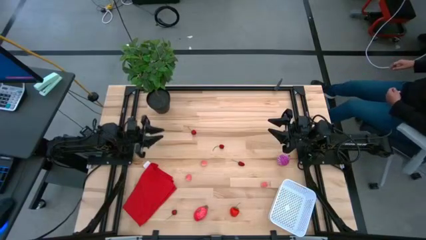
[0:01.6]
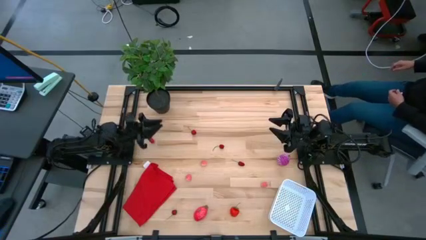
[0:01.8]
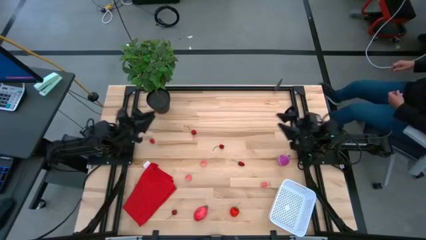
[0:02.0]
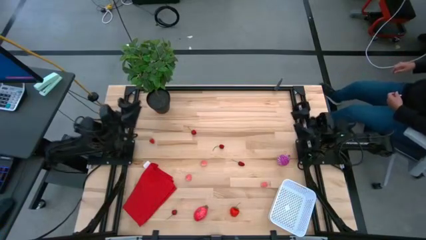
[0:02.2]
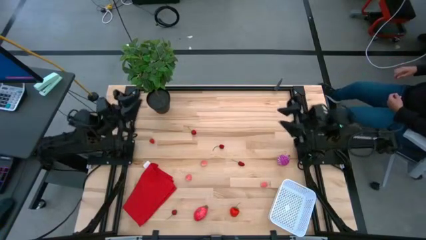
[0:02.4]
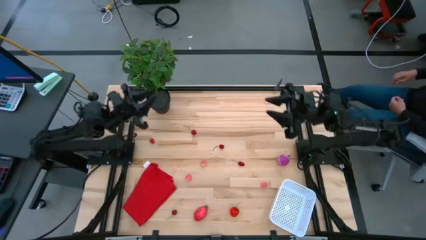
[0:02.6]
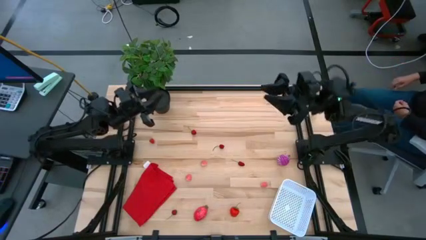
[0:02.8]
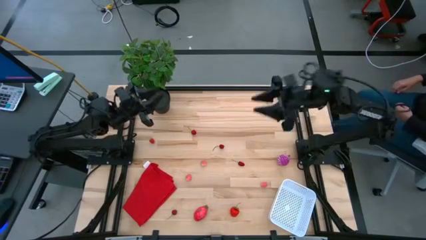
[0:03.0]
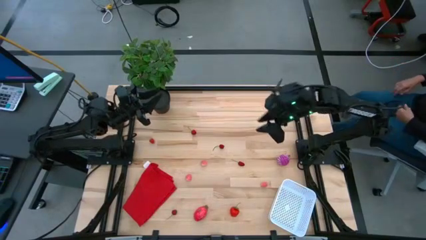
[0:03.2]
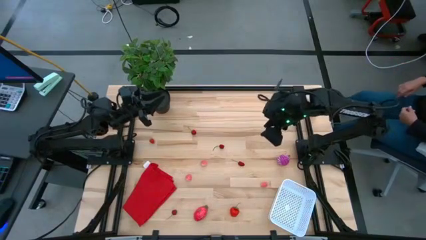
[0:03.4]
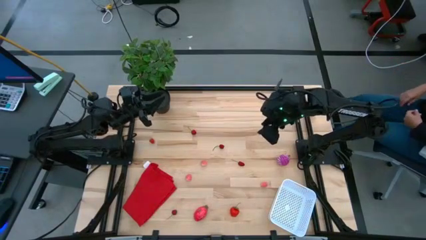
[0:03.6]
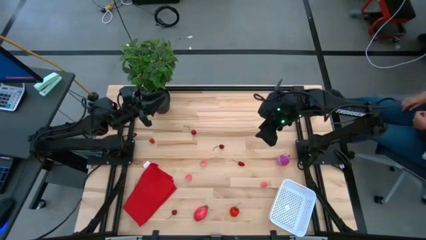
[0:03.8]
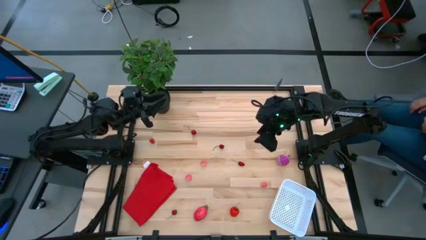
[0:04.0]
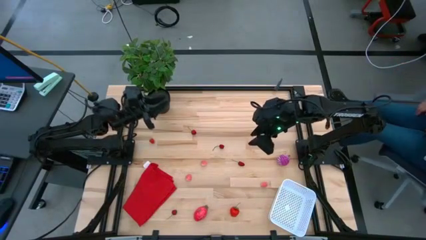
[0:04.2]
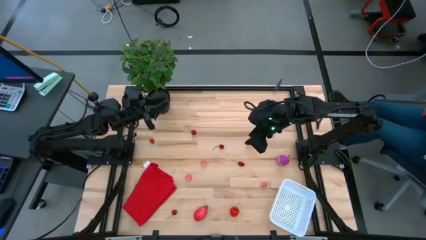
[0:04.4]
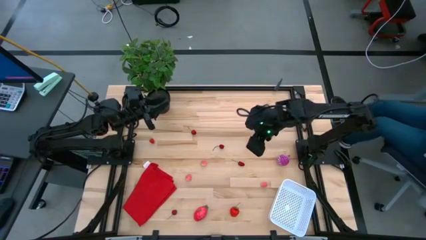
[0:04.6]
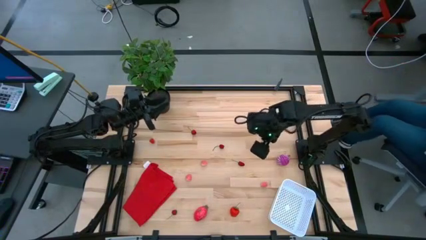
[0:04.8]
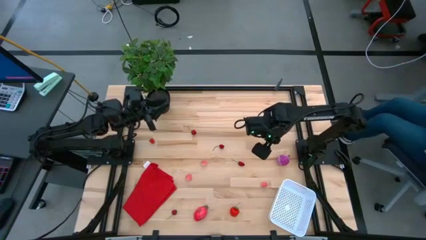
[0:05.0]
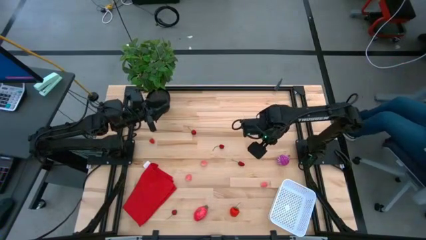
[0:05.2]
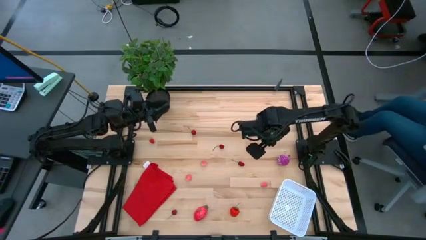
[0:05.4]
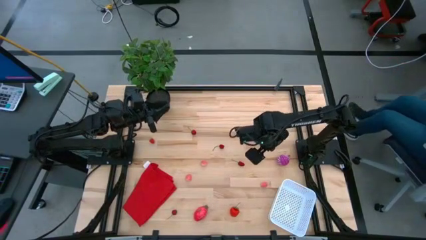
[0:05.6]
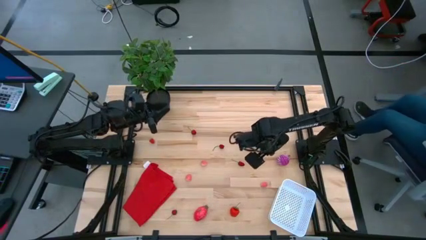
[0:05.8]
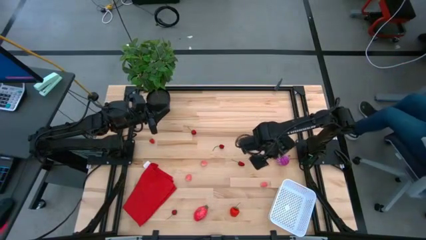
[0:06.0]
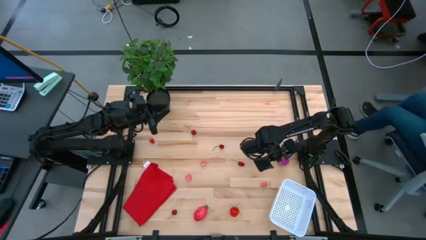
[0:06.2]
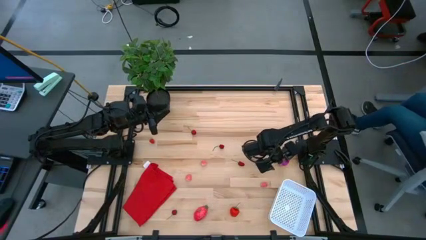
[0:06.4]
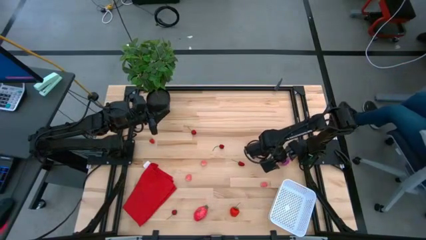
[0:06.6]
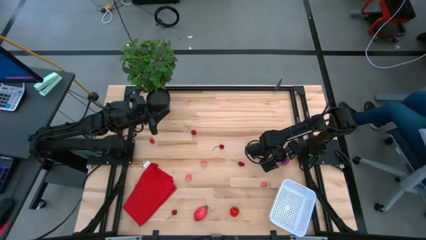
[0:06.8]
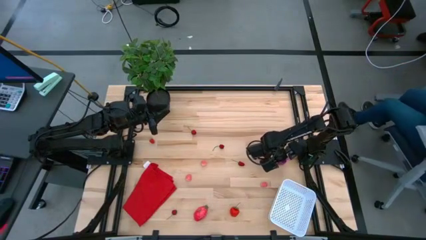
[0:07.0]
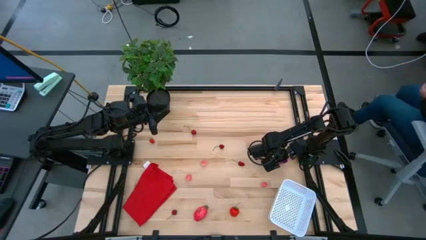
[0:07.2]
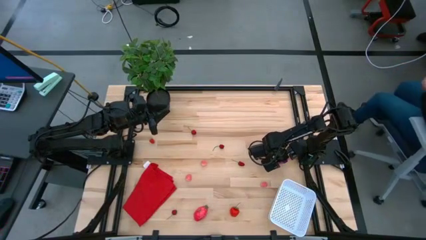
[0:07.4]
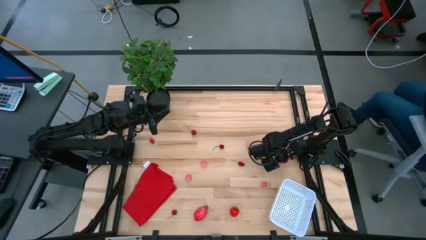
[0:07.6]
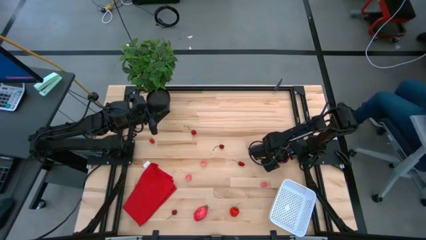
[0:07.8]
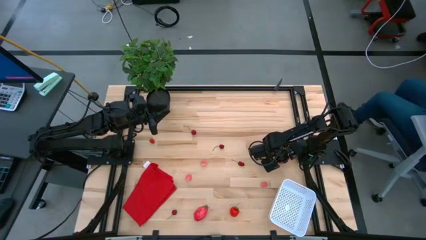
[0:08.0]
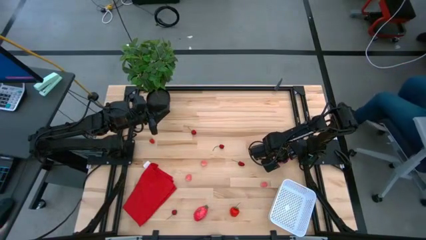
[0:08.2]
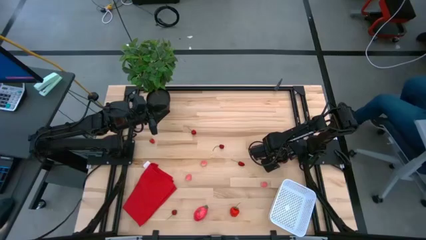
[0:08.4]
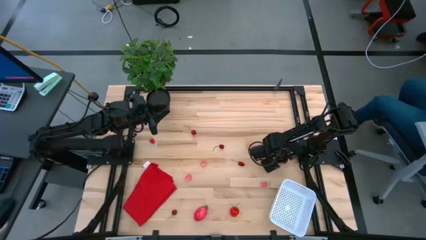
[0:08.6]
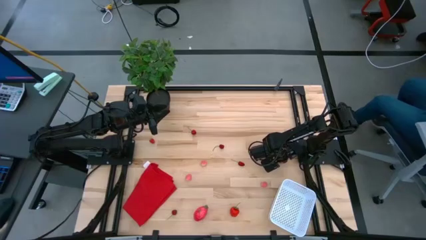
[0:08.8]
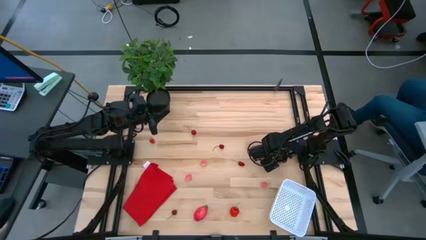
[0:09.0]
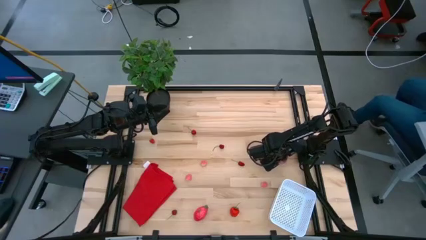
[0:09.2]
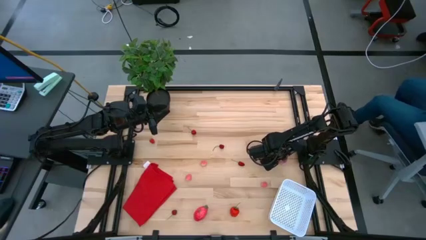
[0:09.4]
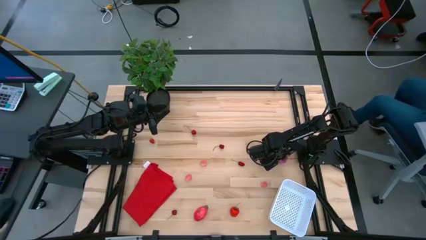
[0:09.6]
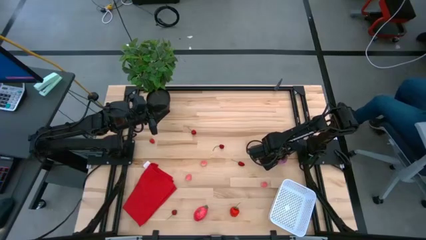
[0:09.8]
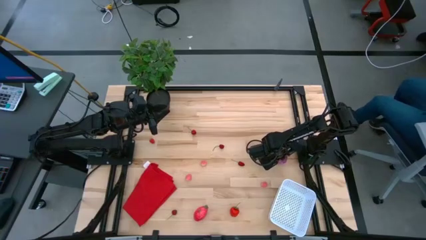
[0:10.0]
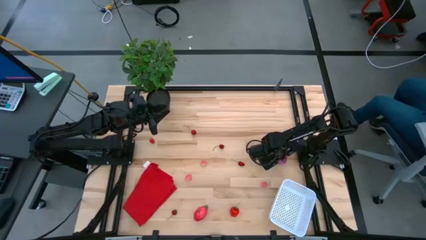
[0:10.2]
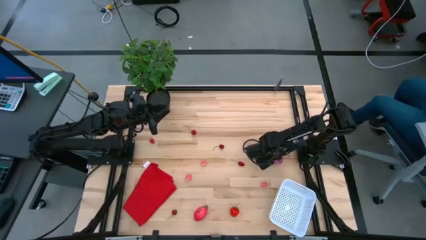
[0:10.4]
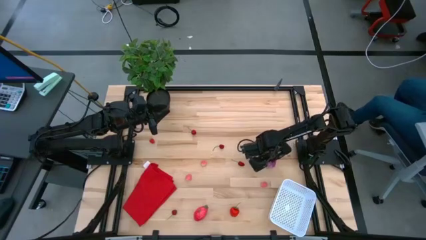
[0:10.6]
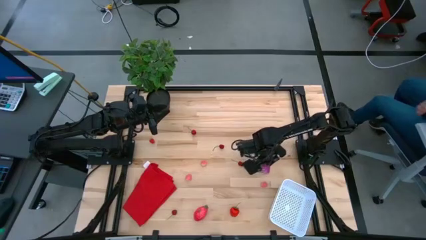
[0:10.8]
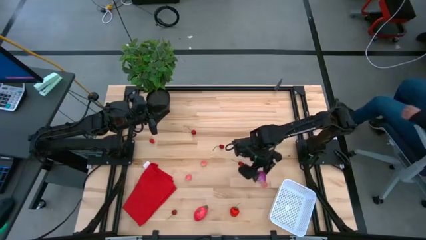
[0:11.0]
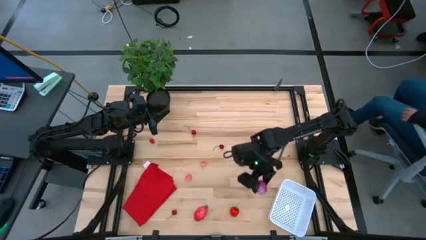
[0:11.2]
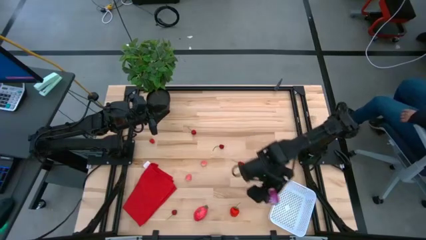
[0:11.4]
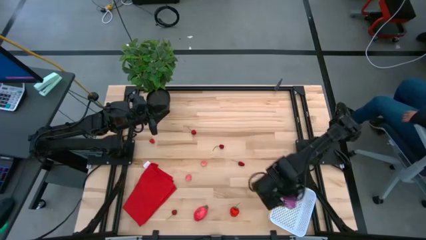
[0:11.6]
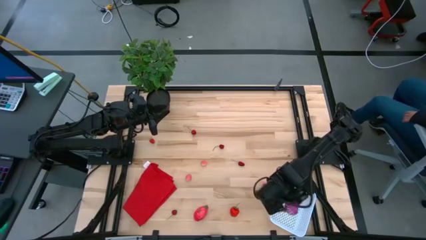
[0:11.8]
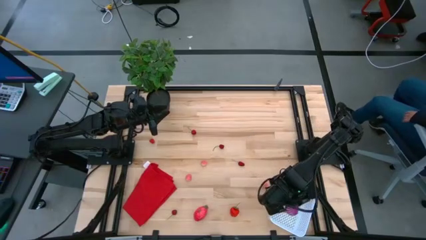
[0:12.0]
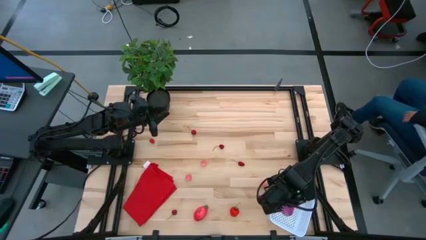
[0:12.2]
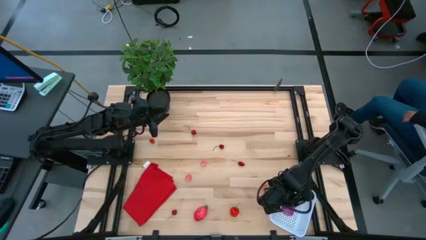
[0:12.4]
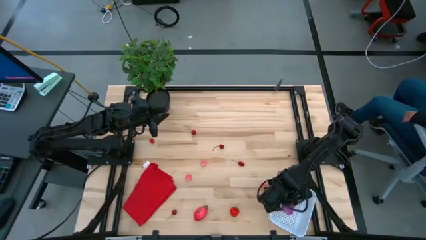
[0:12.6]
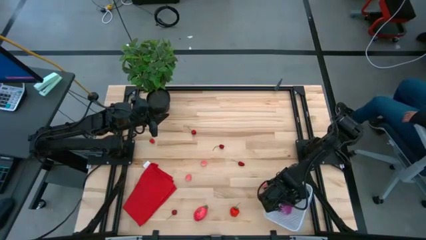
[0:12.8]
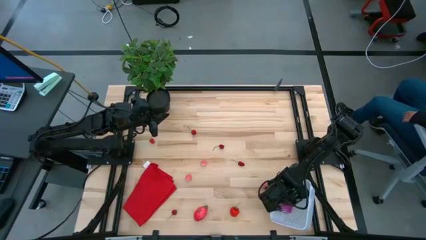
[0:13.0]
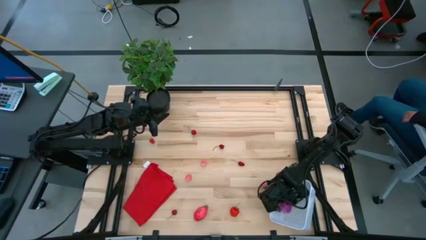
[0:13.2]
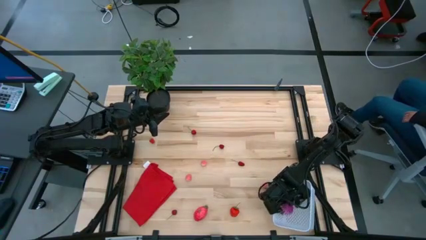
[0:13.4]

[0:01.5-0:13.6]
Task: Pick and placing Produce into tupperware
Put the purple onion into the white basket

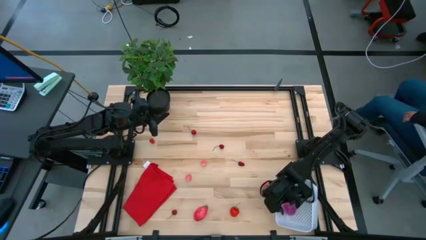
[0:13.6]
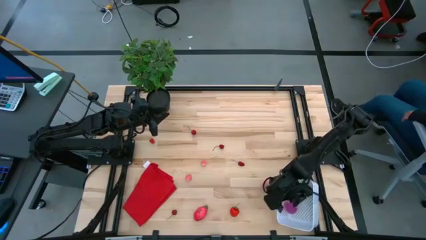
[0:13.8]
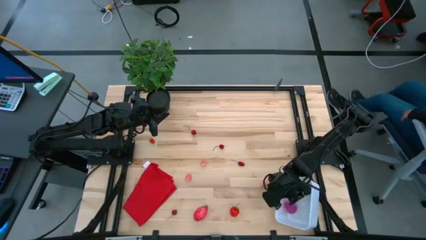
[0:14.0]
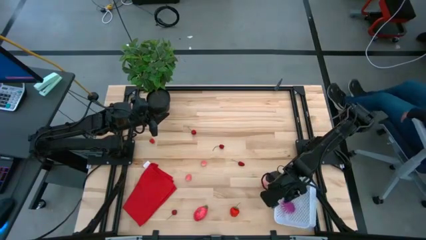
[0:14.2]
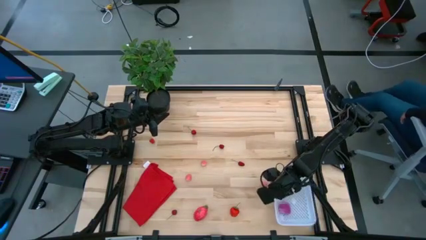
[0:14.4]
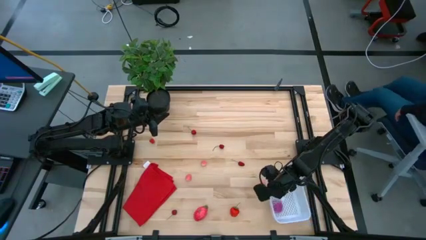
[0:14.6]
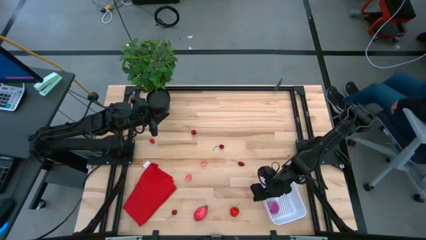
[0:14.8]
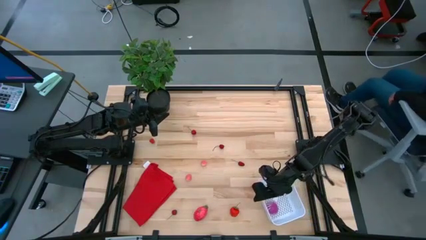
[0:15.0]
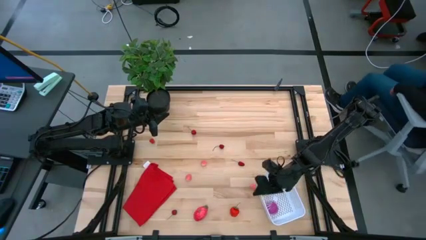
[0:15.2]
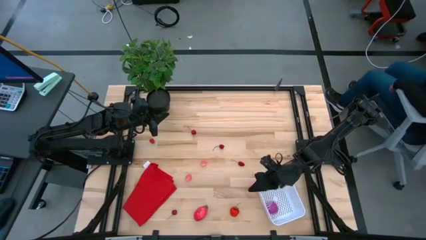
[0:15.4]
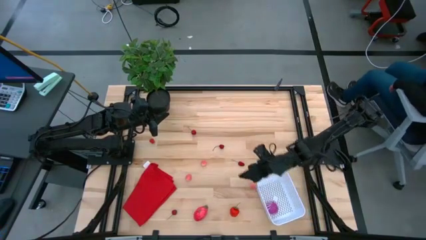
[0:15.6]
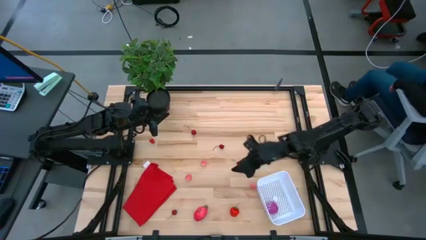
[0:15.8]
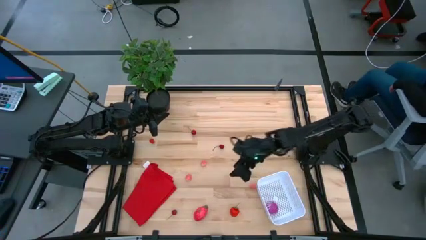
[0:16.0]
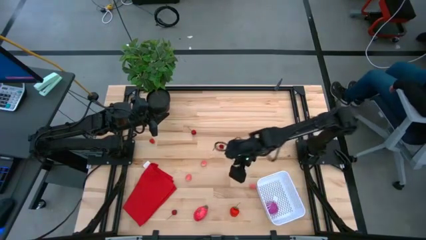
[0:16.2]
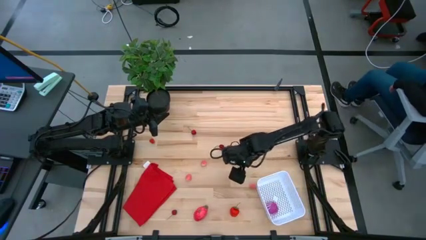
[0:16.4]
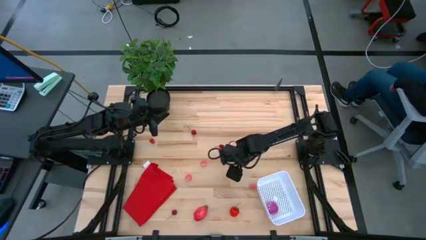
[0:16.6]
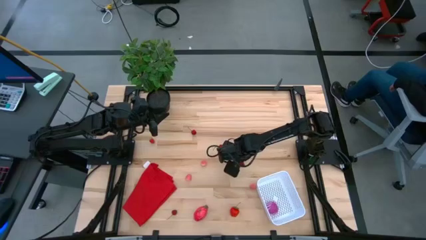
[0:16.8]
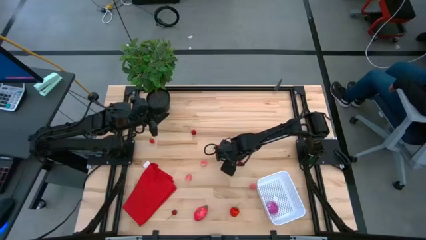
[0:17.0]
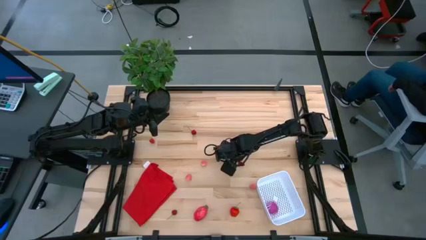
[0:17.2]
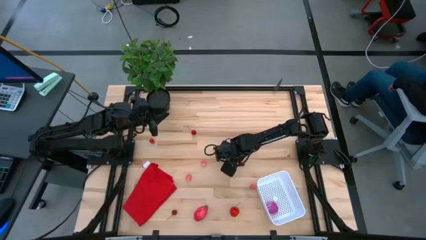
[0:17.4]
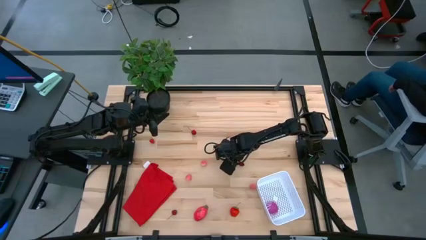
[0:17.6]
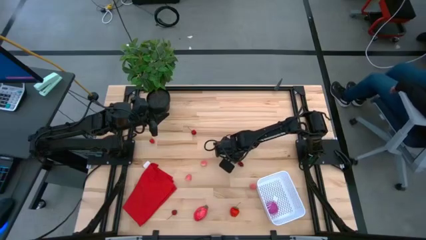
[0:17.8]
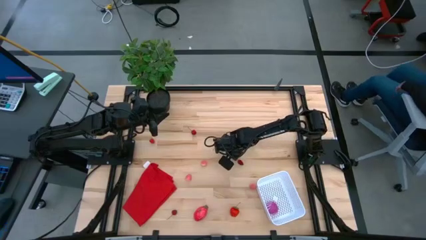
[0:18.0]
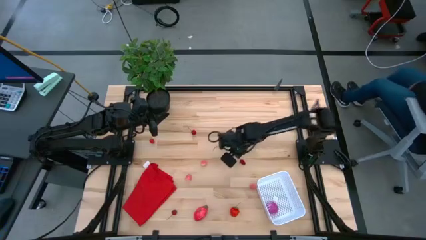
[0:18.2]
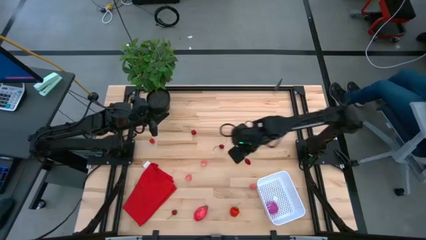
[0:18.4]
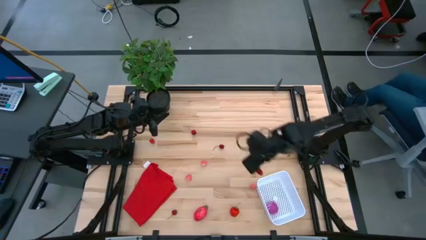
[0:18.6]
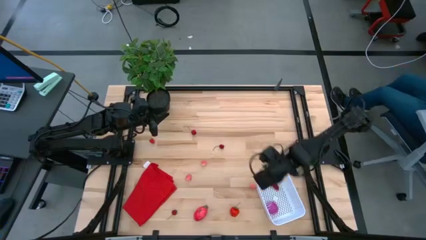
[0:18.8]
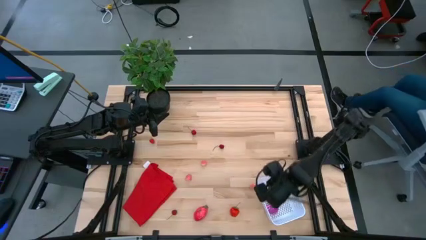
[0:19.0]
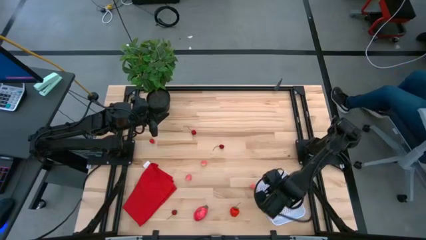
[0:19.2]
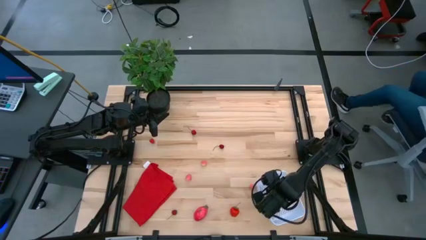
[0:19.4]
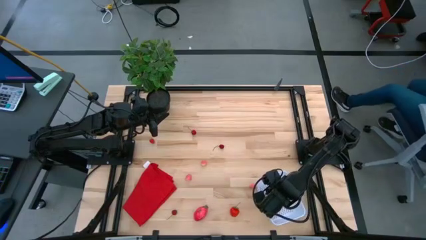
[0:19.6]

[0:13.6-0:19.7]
Put the red cherry into the white basket
